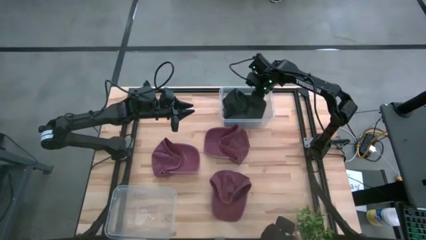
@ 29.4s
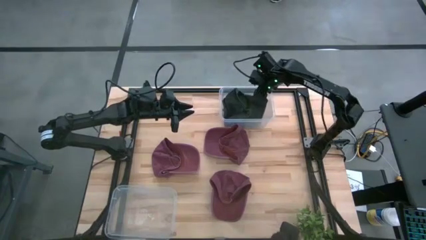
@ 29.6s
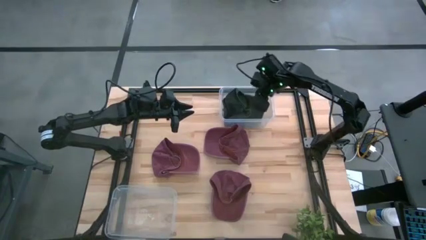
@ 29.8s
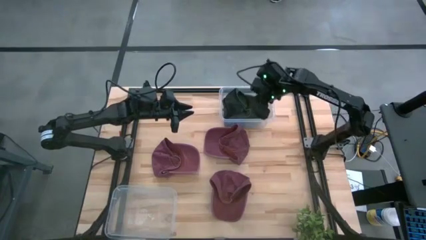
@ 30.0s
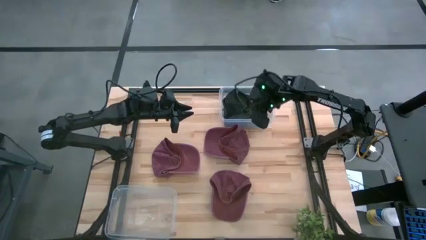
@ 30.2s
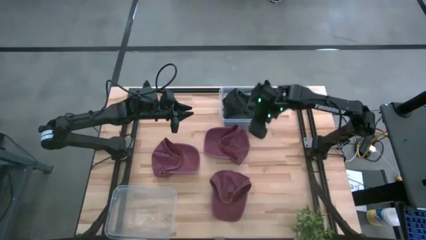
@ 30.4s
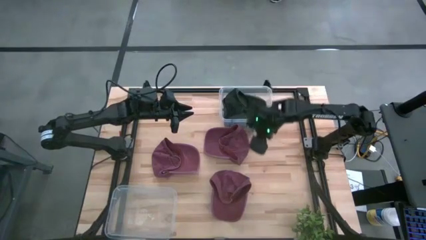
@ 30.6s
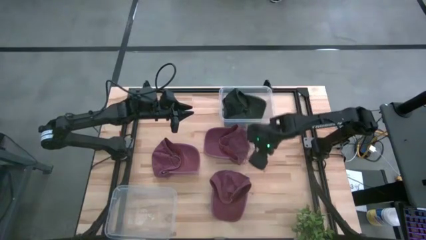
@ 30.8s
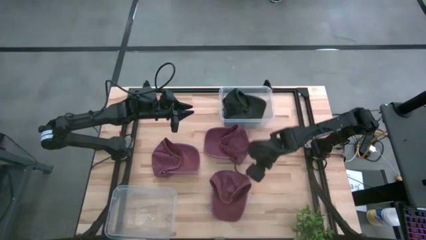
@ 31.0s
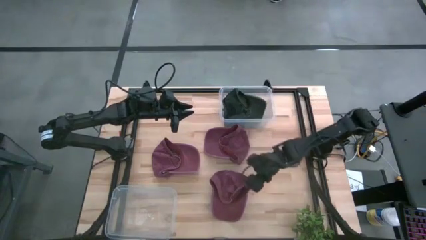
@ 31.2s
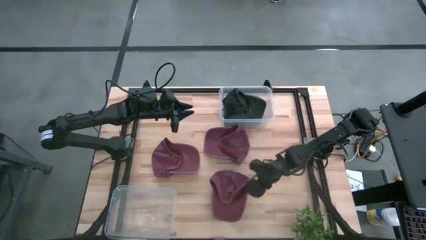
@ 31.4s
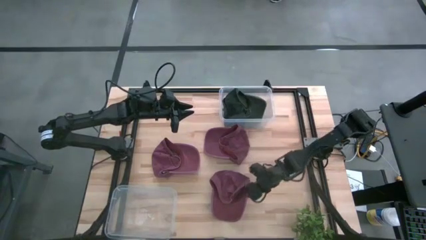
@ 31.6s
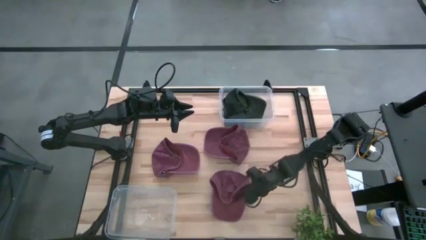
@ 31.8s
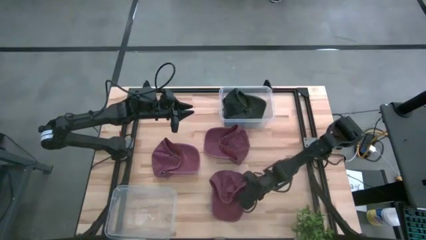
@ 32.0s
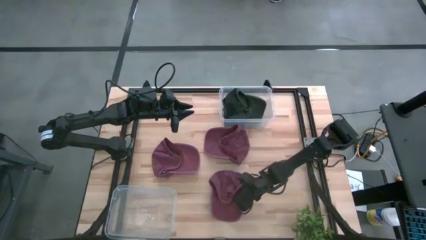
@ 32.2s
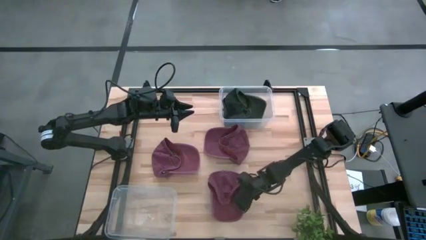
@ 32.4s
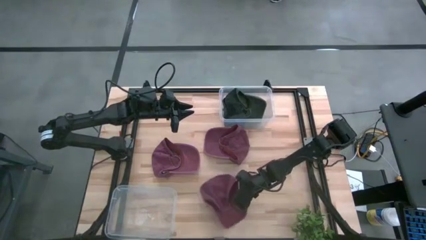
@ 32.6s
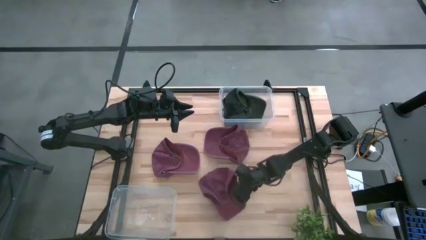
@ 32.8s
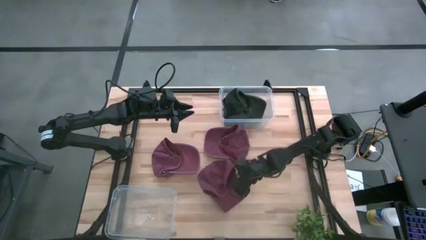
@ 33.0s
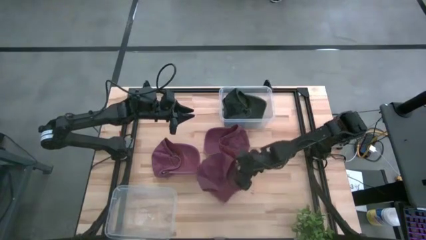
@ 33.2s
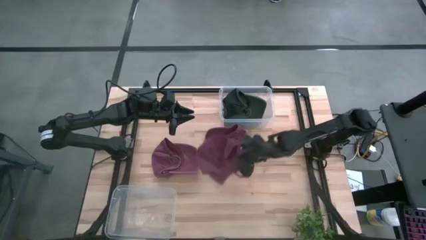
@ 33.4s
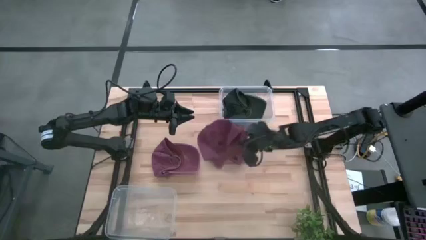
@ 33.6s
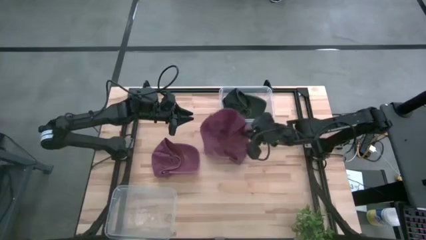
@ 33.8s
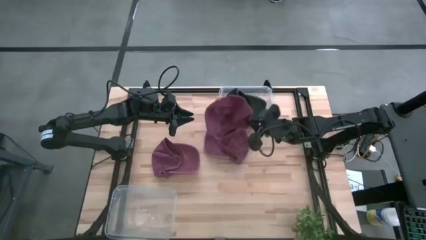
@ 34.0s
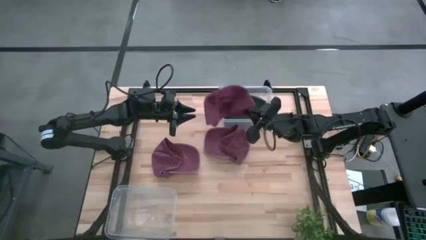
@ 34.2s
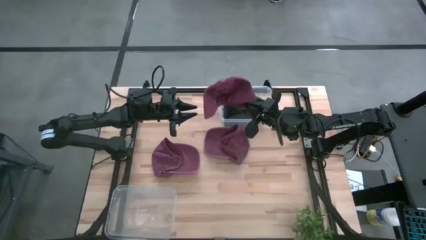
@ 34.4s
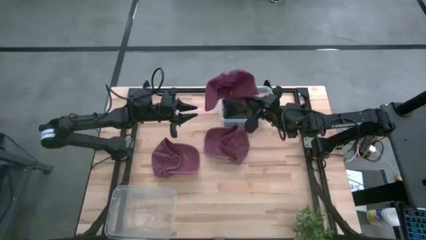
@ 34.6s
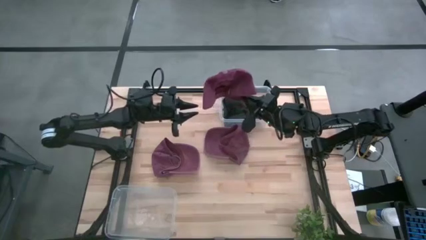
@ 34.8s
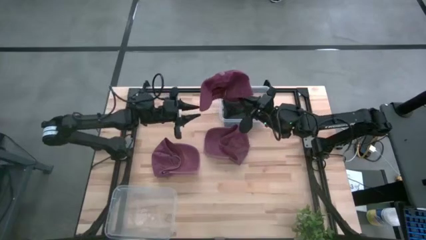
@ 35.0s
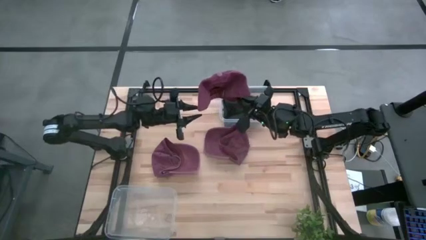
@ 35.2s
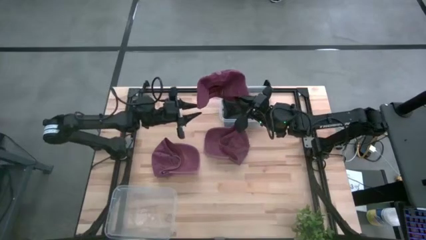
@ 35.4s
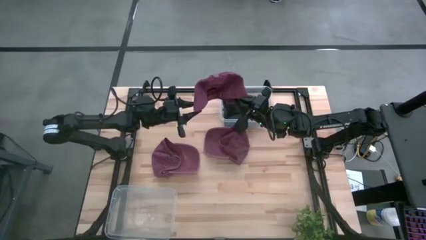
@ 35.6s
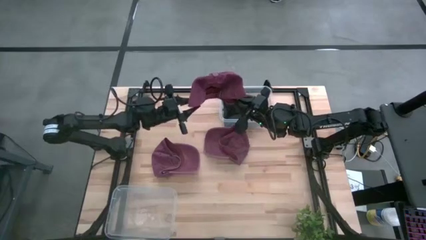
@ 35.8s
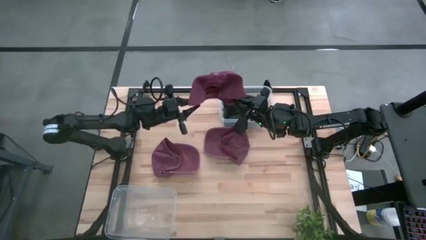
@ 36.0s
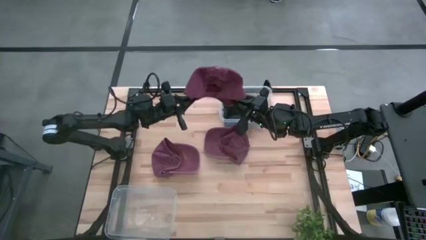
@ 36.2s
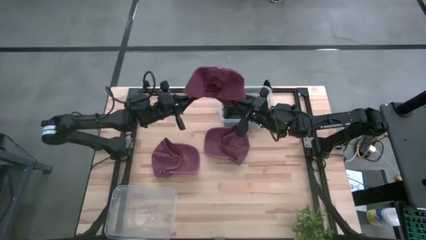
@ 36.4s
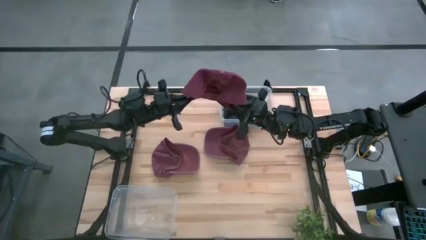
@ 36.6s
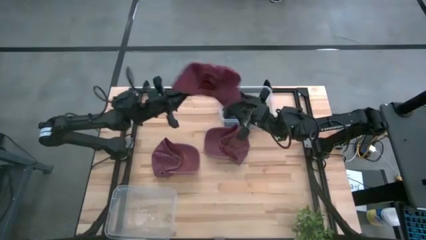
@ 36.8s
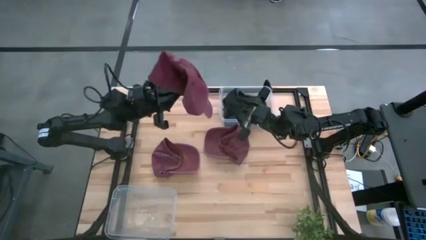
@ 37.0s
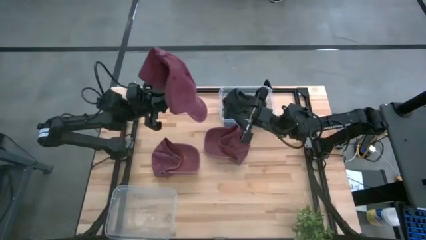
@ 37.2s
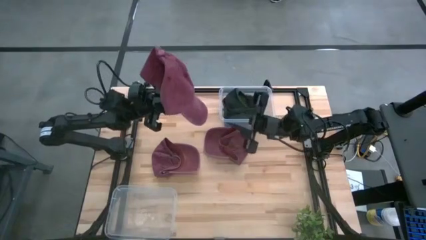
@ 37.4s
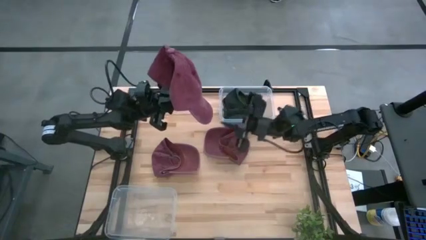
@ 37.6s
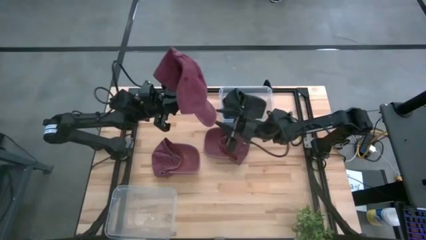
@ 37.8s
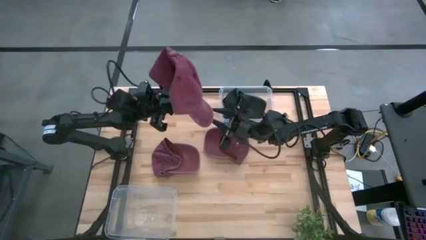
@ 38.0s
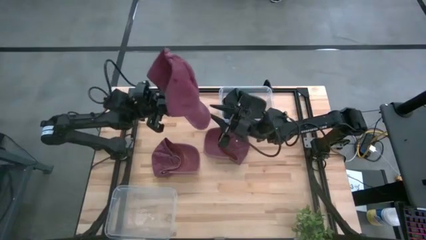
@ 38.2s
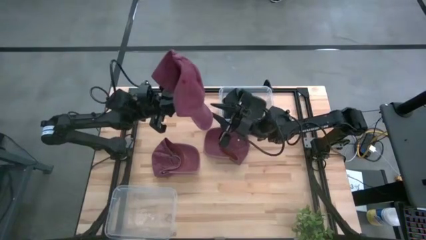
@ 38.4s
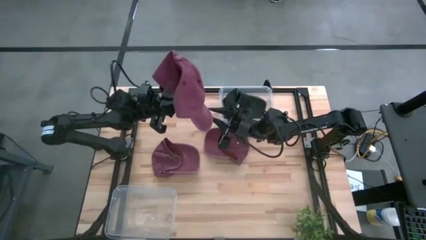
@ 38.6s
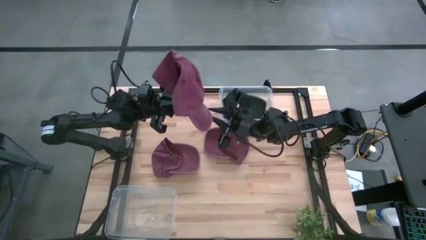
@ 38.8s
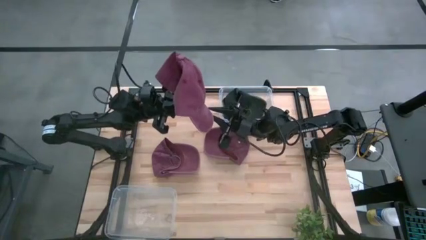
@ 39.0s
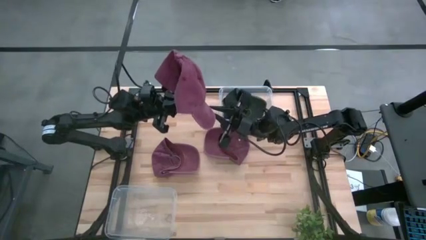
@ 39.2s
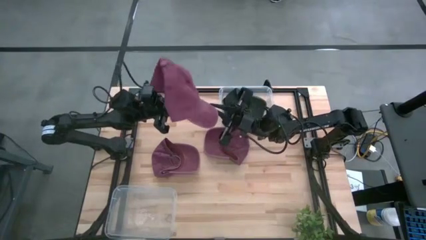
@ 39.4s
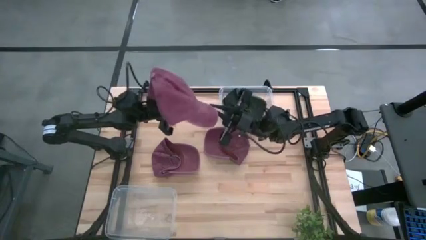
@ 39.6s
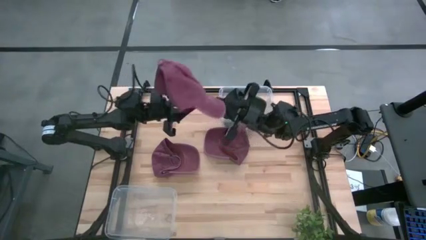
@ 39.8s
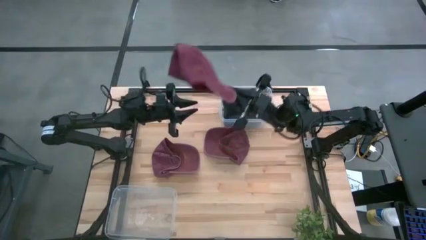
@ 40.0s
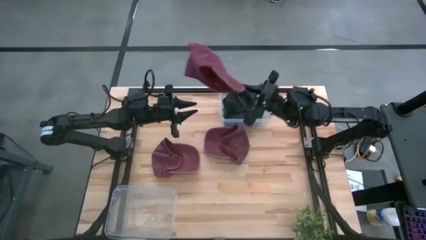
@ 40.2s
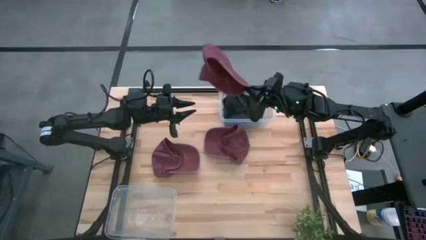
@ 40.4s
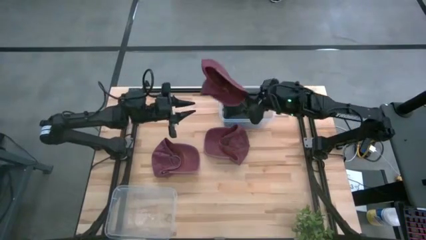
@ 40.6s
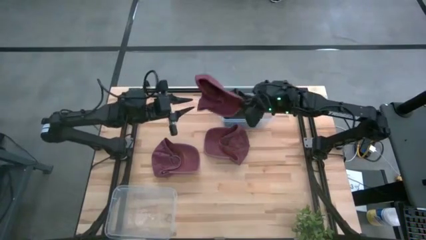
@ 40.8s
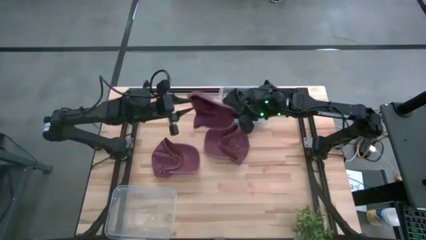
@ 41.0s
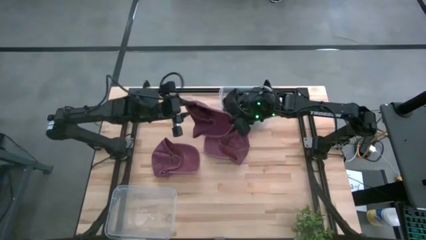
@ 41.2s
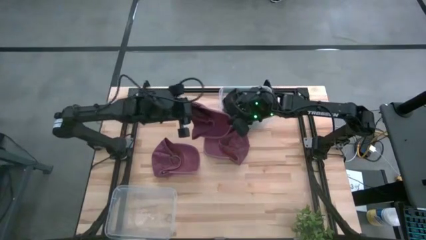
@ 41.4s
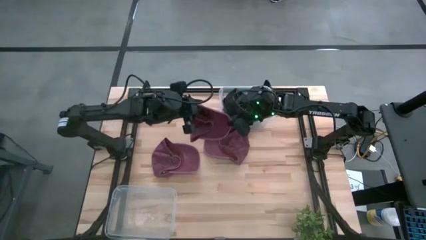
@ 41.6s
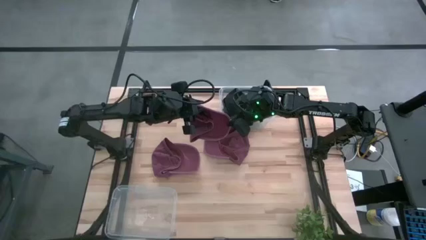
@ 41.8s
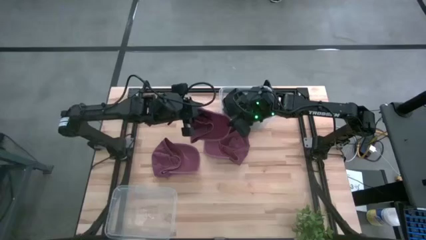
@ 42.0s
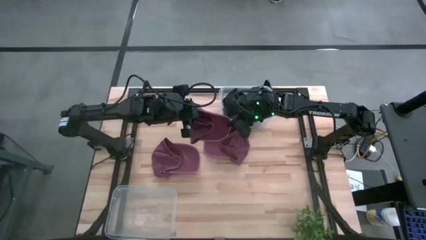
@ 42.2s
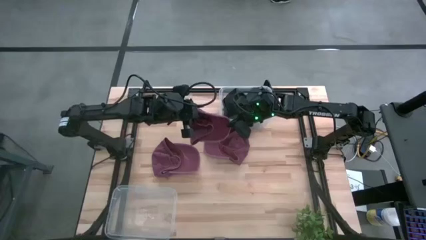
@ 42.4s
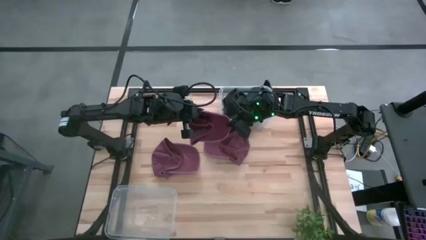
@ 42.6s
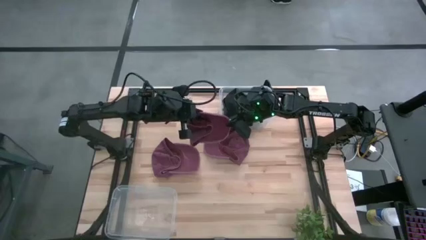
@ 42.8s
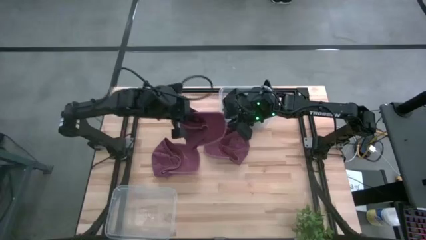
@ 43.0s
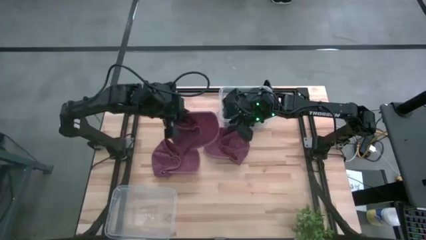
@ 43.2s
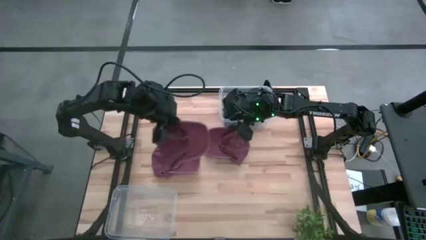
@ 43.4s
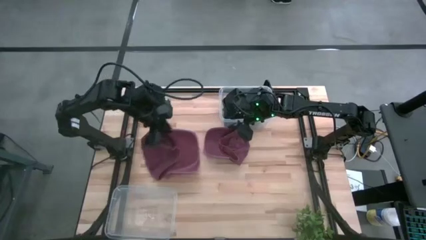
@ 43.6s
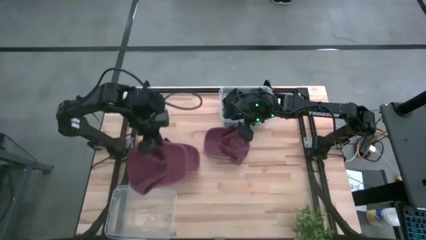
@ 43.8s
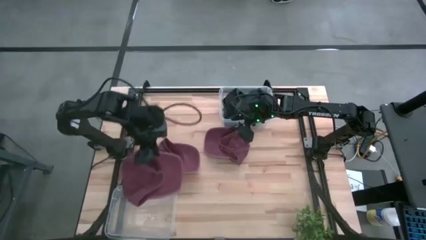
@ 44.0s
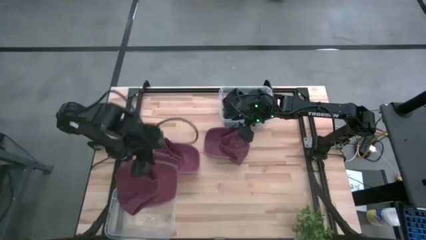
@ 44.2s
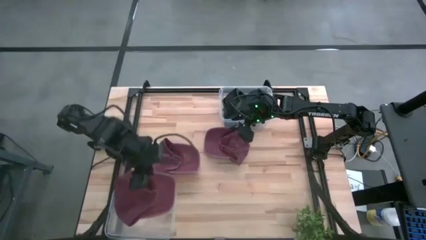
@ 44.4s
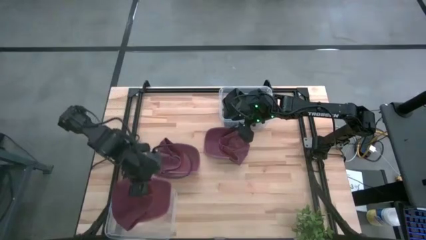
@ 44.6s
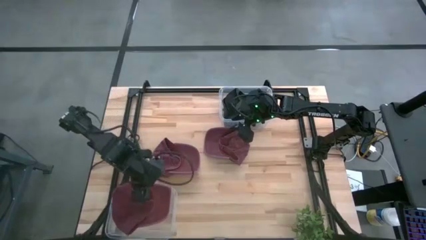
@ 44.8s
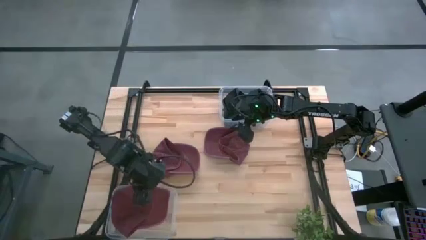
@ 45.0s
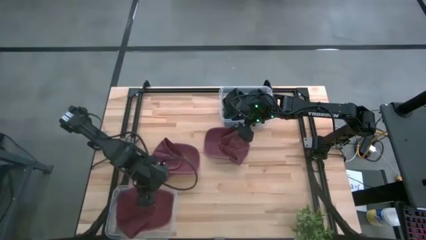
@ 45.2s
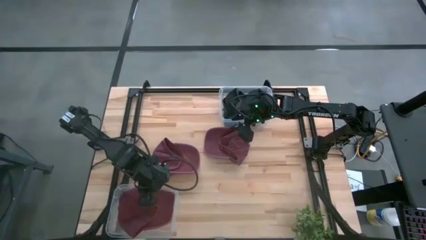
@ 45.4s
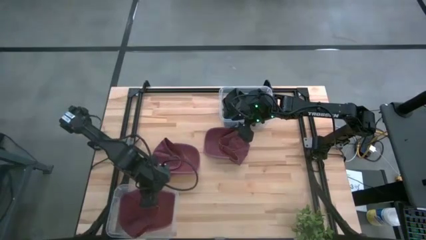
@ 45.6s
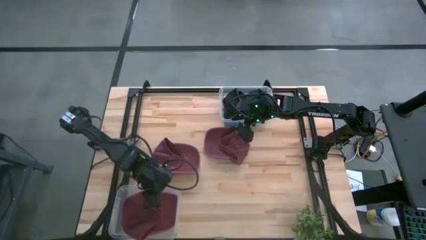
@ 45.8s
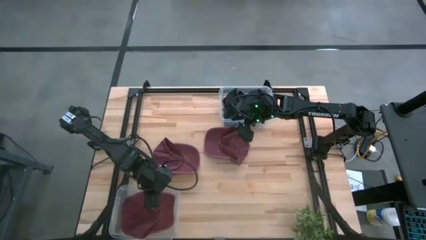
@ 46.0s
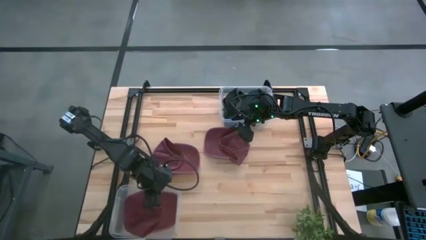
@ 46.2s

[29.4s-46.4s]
Task: Pick & Place hat
Put the bottom red cap into the bottom transparent bin
